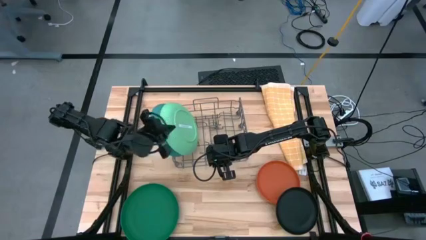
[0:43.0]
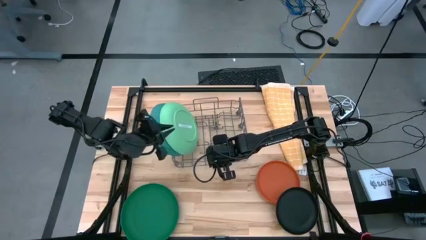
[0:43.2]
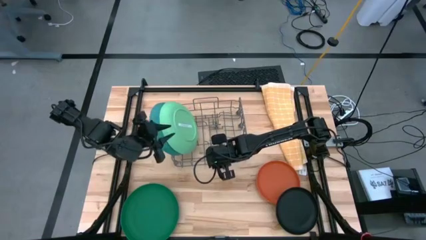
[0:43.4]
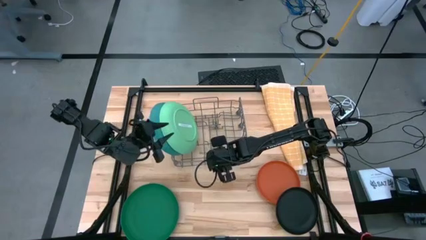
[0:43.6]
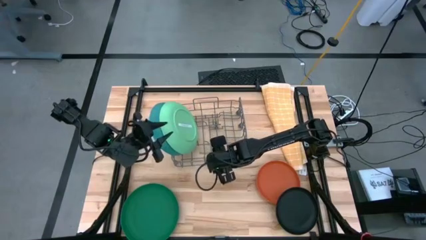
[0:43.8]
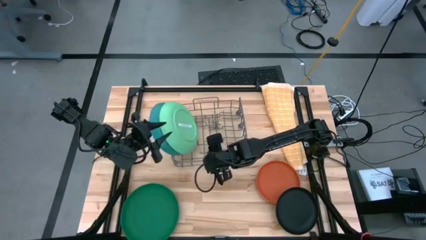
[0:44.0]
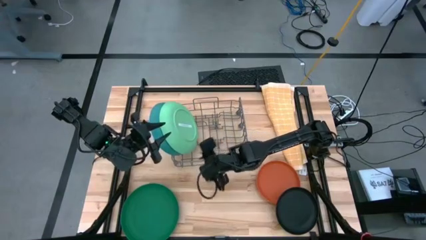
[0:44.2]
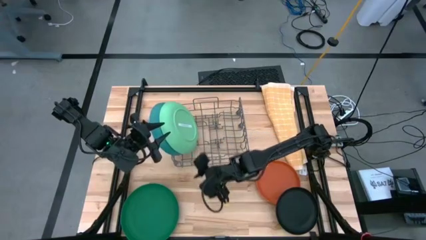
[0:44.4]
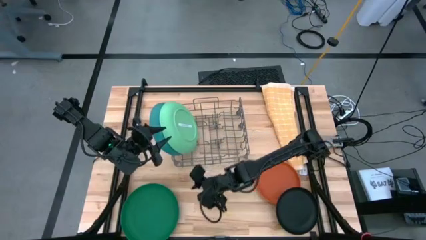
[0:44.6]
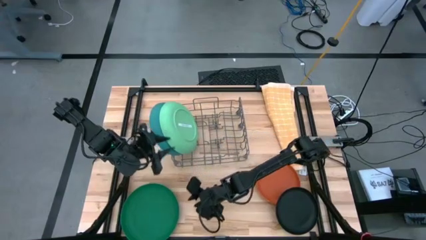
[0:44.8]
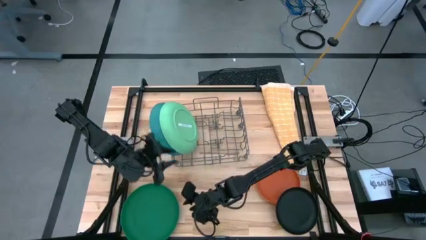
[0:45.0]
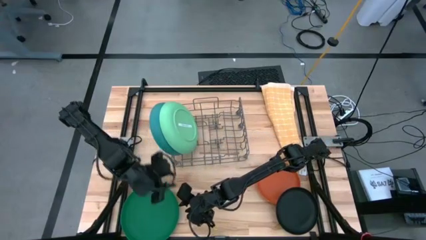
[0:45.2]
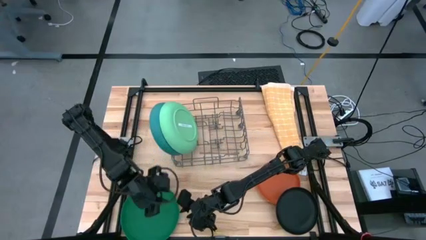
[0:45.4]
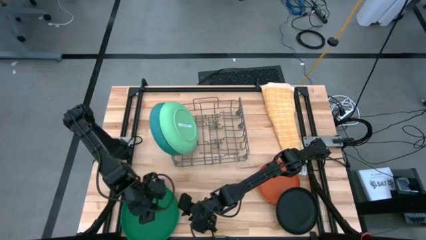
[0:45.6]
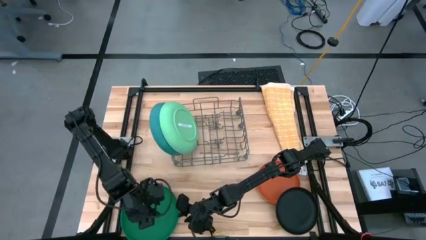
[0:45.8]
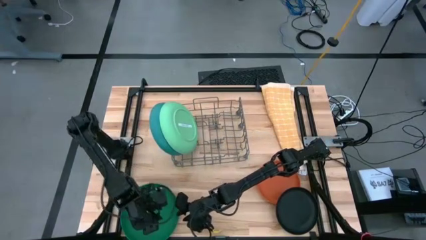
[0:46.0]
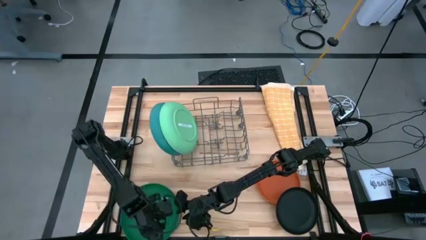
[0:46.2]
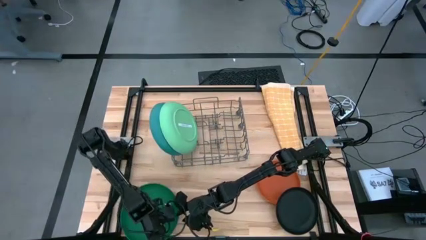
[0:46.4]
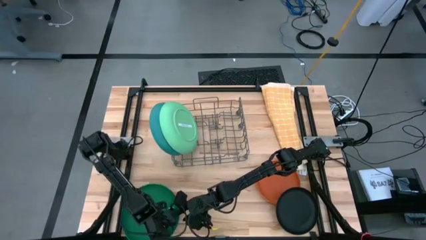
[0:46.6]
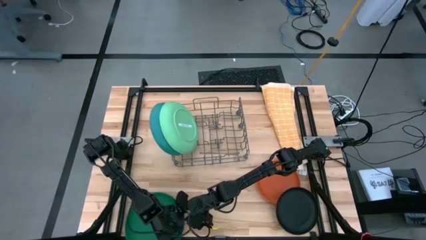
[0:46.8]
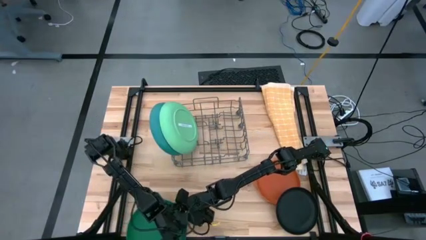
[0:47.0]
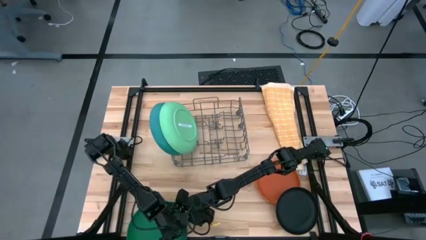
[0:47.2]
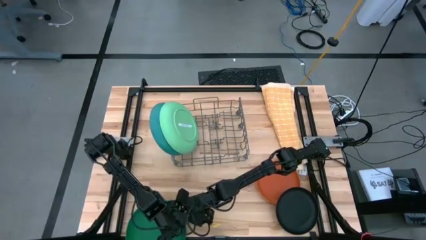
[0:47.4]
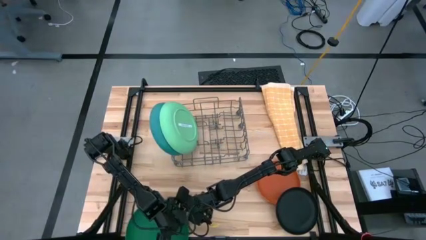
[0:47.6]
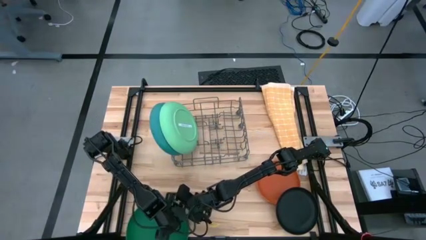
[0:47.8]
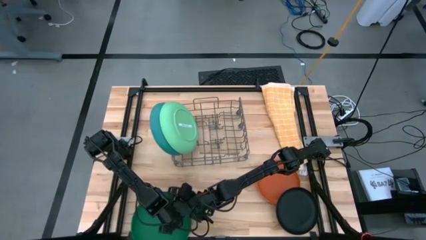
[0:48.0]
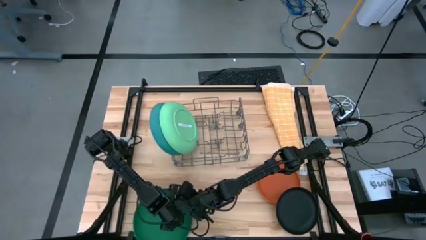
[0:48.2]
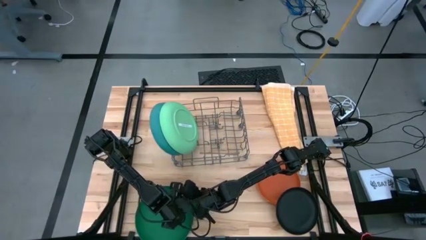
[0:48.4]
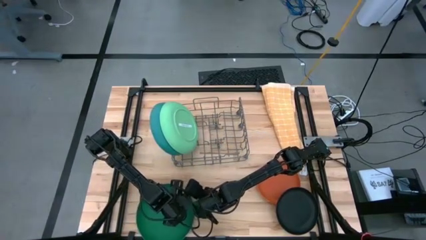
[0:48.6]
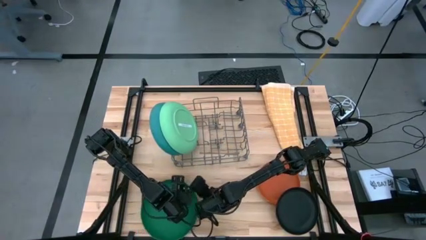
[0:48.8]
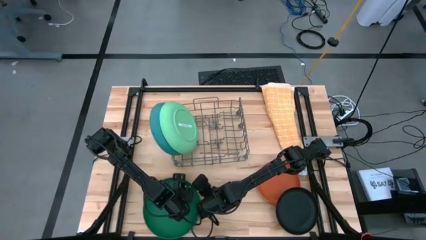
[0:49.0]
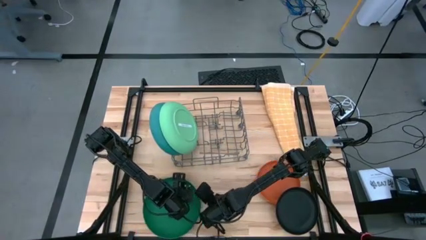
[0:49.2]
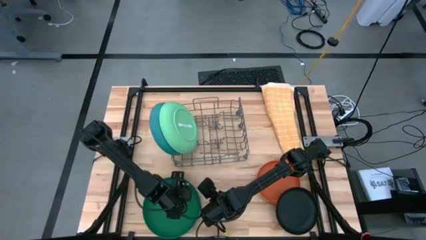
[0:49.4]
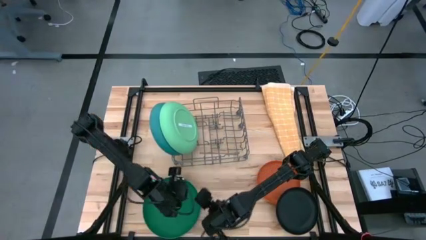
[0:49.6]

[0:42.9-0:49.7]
Task: Sort dishes
Adjust the green plate

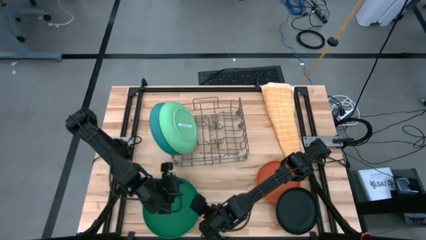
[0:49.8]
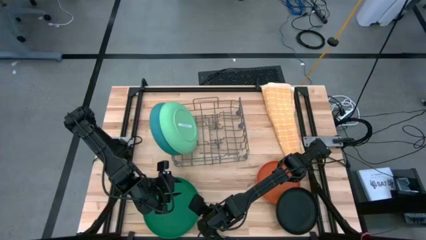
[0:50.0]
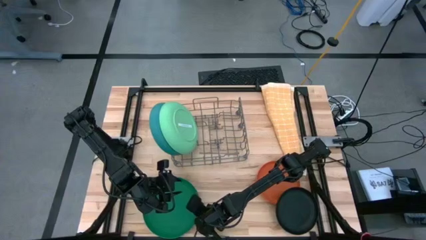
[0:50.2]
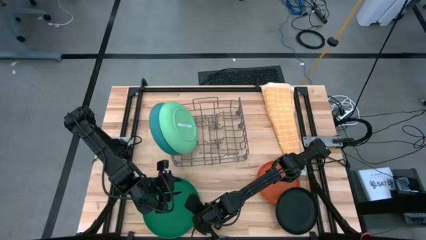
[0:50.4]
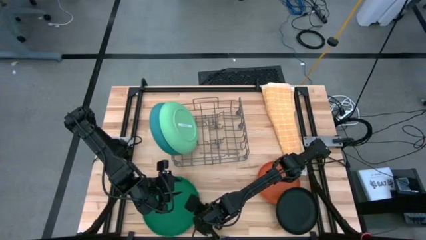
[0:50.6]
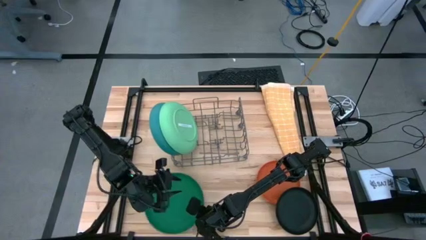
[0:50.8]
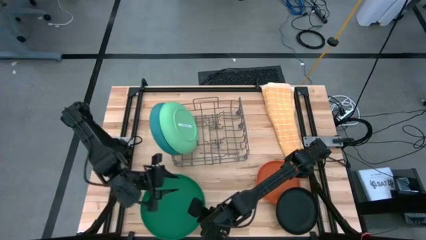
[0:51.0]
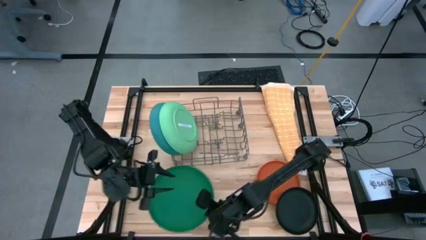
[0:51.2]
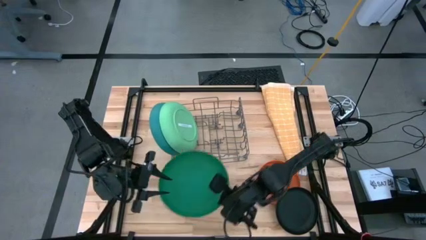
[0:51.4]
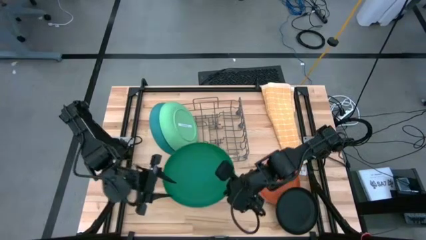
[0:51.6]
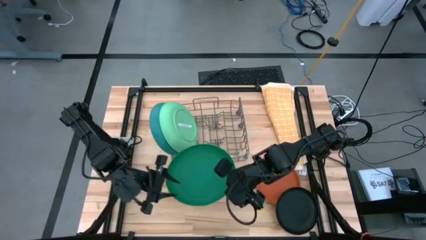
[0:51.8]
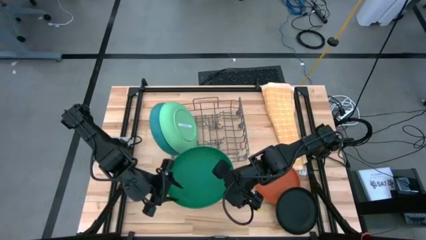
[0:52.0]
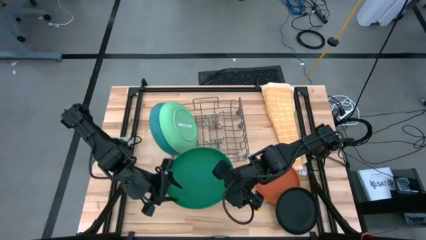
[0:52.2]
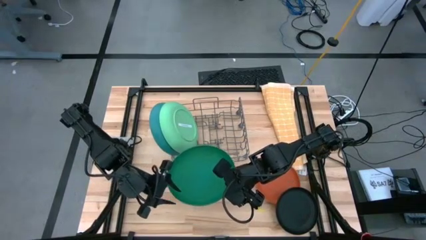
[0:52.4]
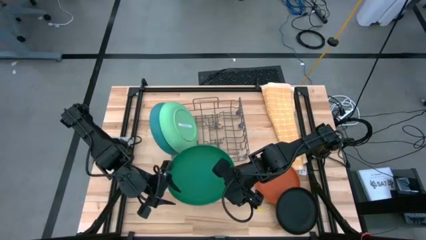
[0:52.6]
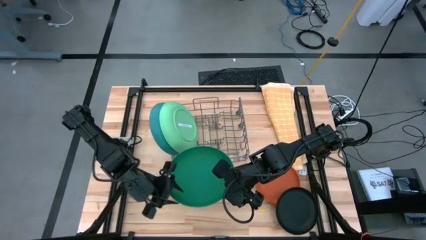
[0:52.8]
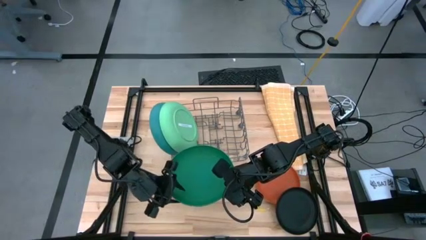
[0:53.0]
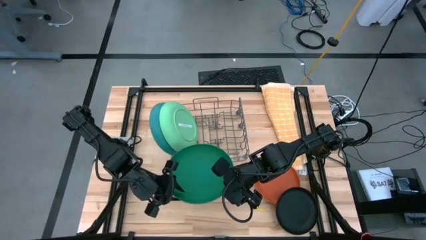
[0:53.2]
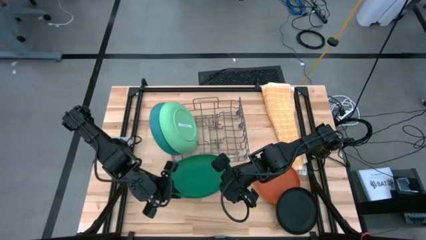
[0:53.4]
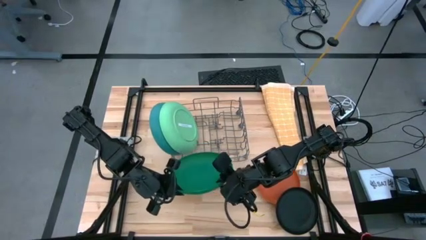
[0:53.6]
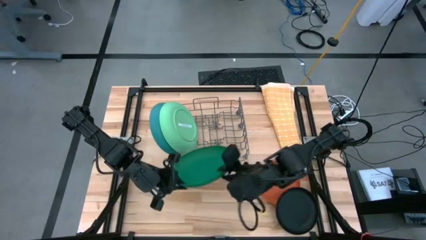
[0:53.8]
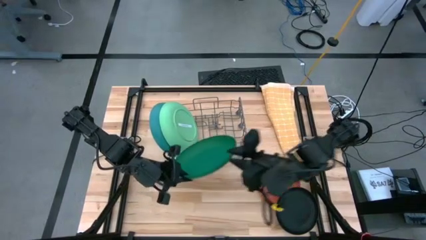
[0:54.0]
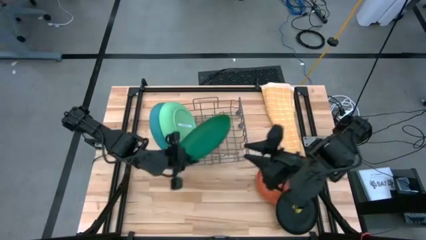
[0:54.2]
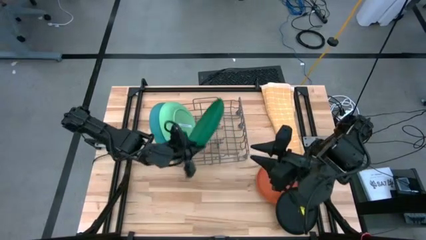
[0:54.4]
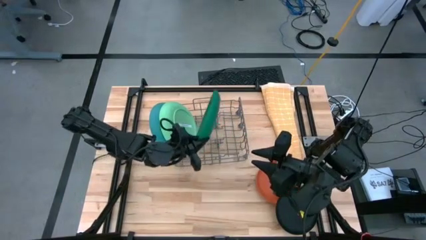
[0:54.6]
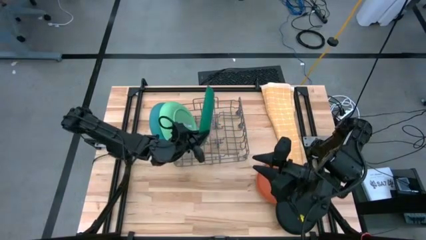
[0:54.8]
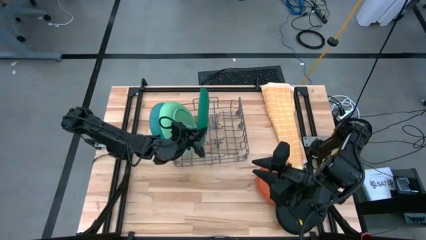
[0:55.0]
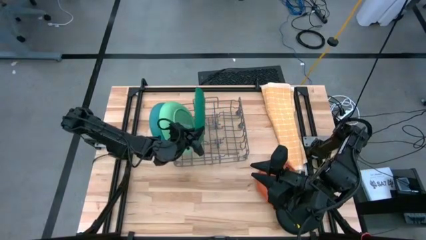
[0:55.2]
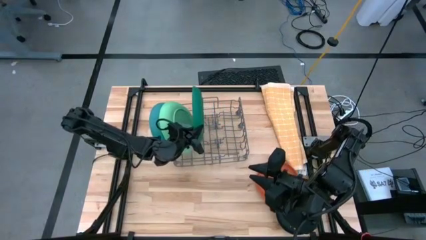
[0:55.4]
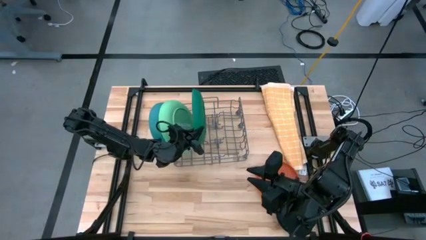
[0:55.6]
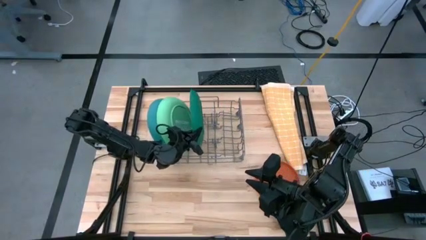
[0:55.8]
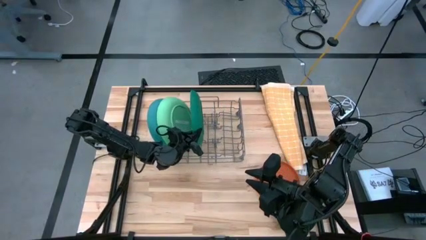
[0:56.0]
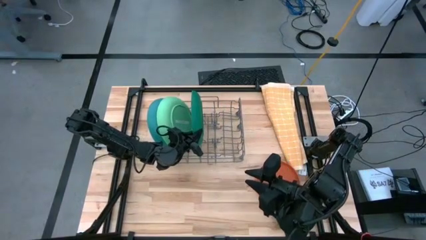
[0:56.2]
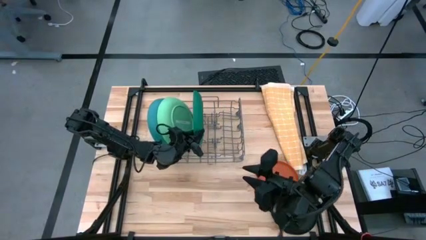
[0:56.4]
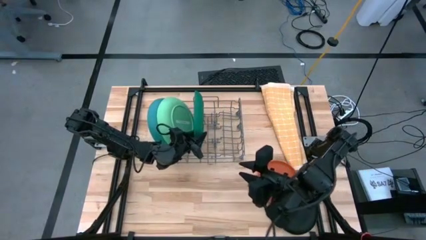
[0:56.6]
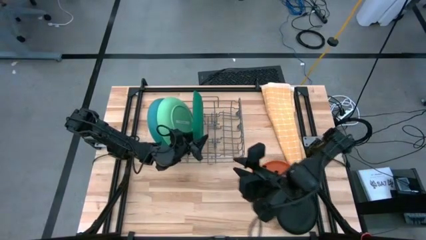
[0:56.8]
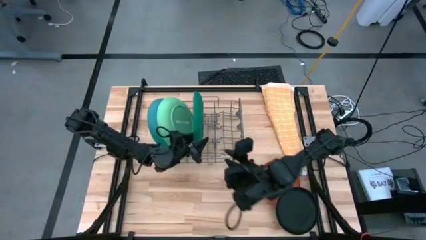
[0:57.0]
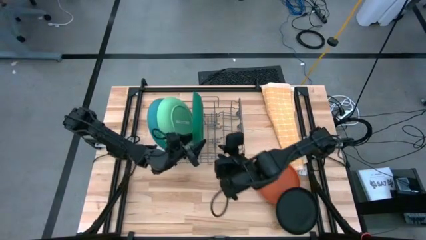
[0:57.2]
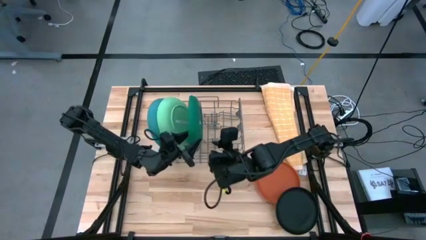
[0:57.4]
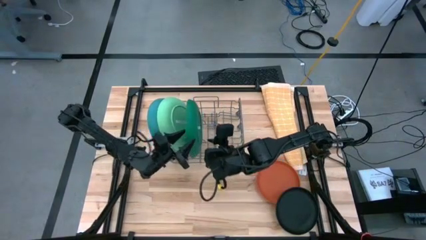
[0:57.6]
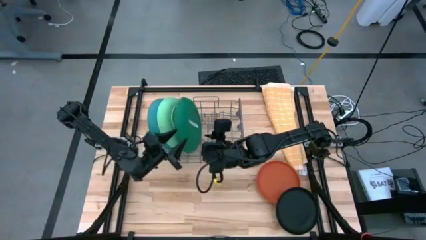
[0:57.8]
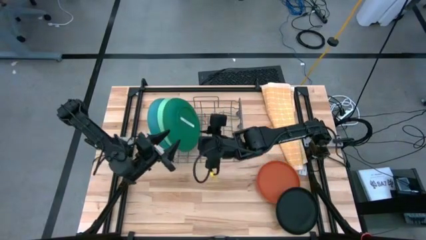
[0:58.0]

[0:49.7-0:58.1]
Put the green plate into the dishwasher rack

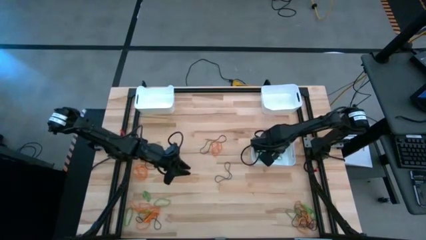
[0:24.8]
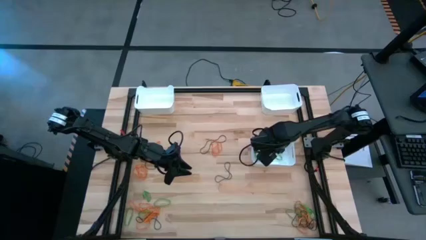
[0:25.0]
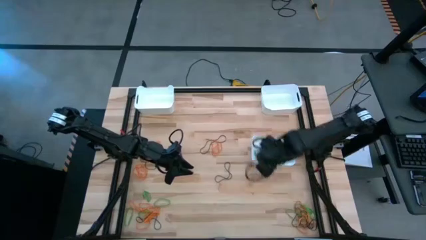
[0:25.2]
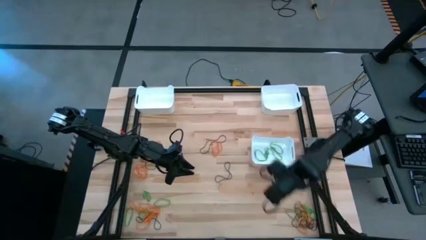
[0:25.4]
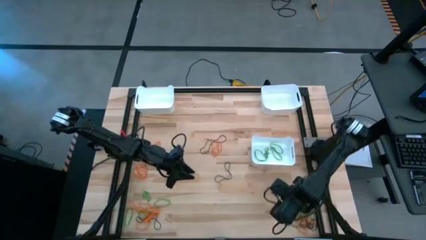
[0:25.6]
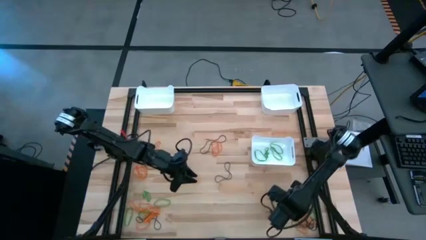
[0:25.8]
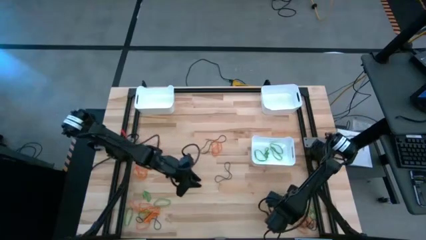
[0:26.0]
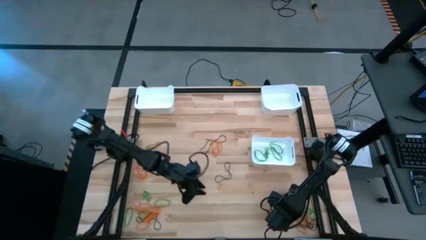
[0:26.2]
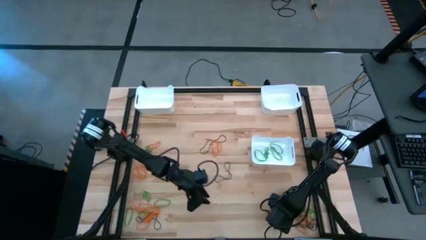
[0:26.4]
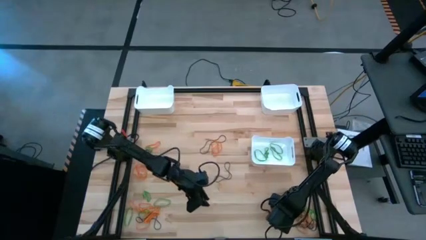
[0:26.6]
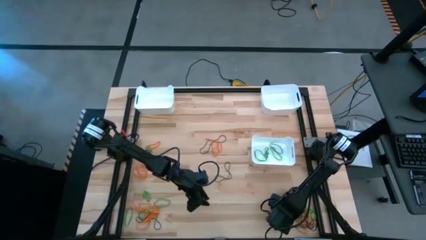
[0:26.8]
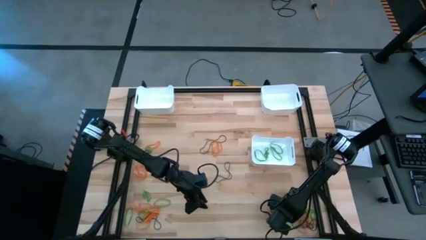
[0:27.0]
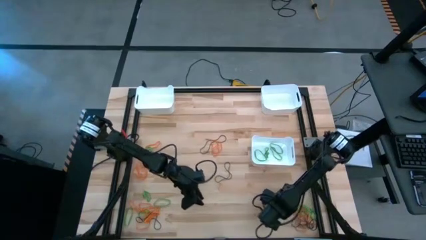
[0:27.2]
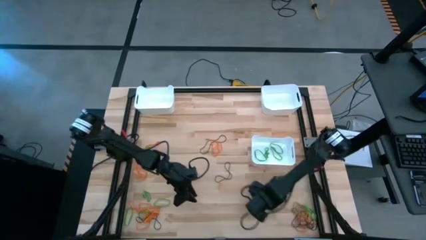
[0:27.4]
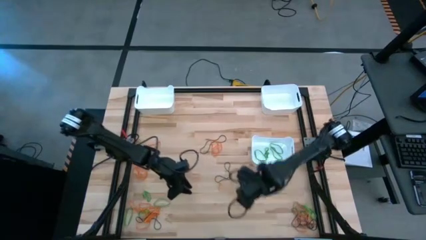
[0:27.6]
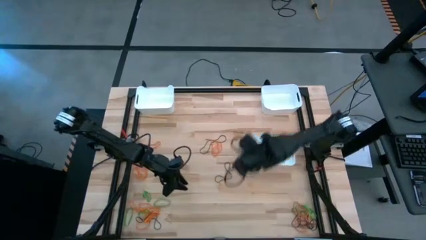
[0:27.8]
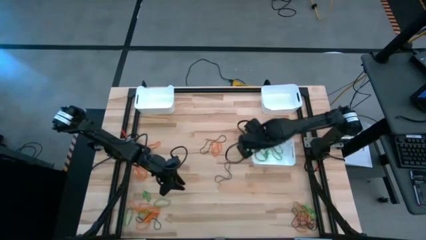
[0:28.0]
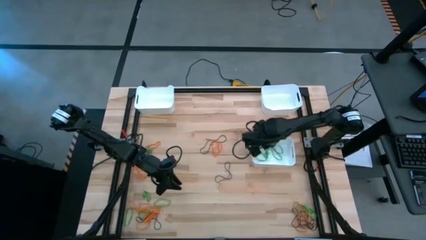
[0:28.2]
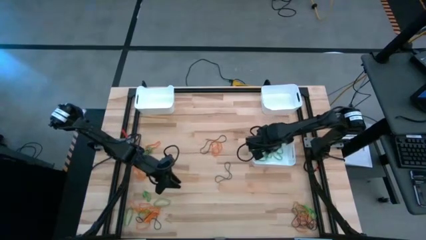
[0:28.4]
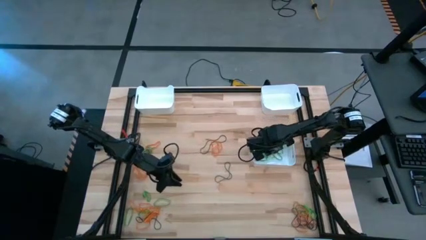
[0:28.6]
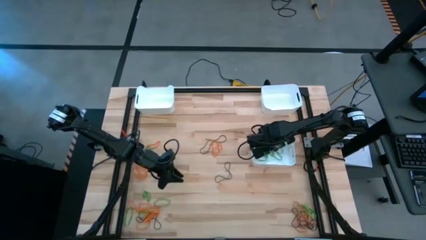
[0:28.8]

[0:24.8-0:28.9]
Task: Sort rubber bands into baskets
Put the green rubber band into the bottom white bin
